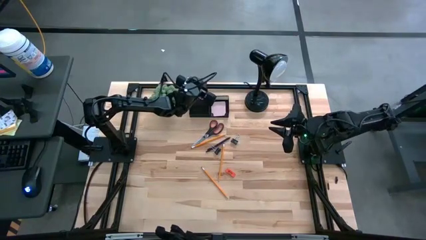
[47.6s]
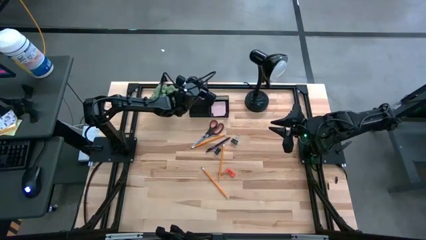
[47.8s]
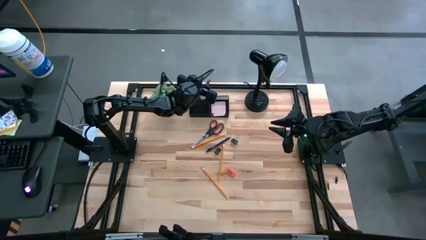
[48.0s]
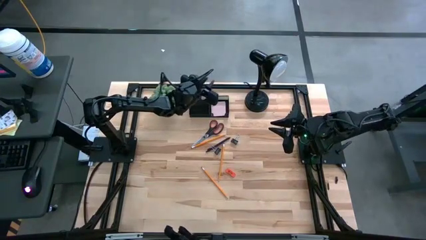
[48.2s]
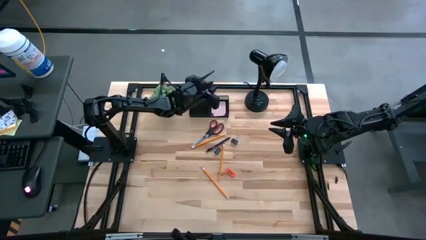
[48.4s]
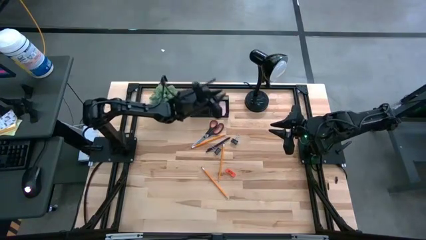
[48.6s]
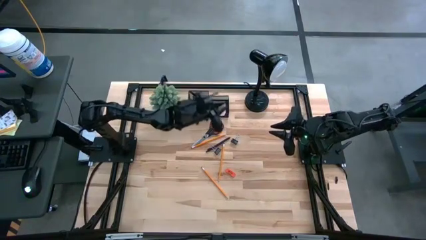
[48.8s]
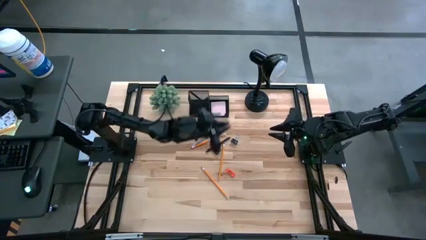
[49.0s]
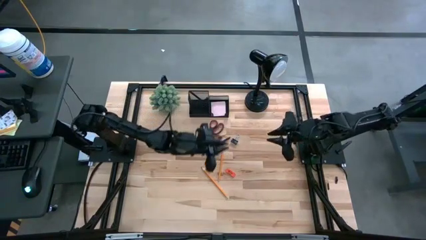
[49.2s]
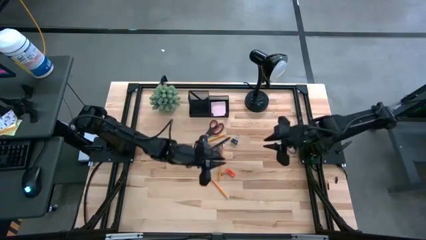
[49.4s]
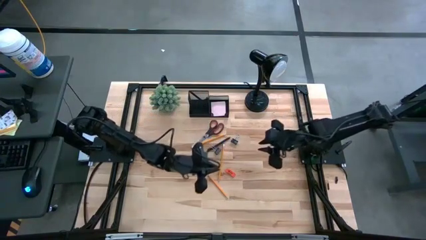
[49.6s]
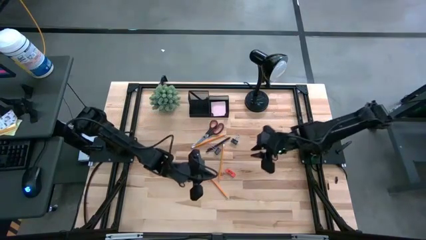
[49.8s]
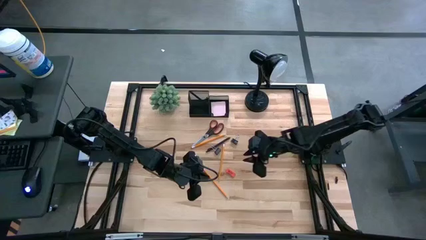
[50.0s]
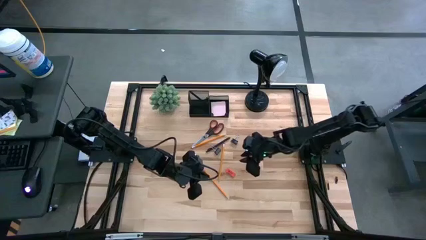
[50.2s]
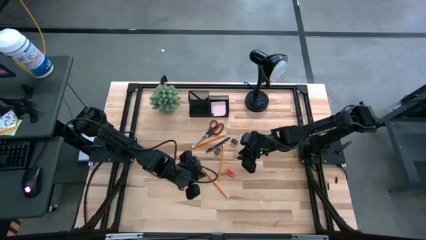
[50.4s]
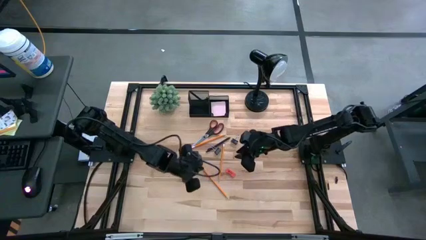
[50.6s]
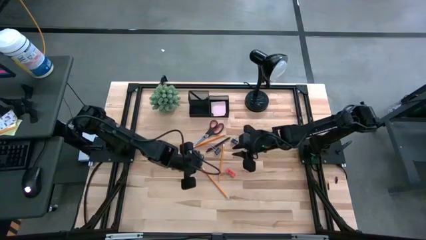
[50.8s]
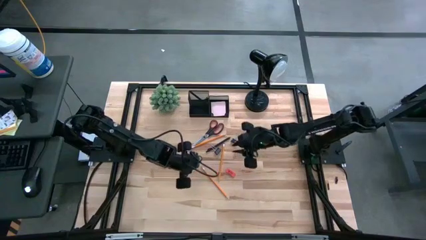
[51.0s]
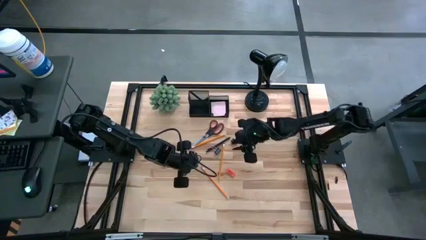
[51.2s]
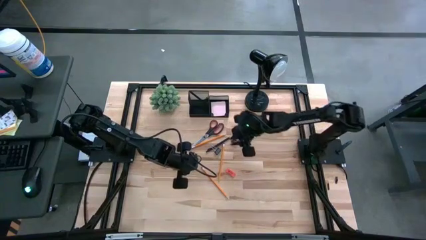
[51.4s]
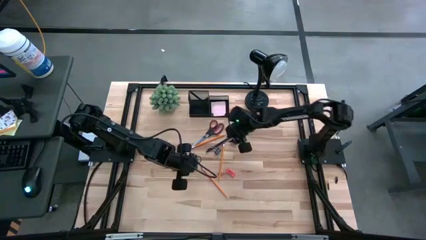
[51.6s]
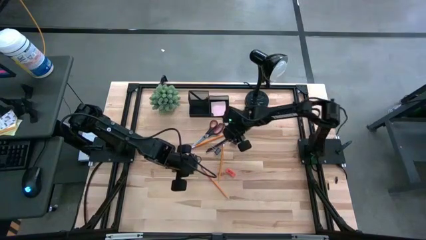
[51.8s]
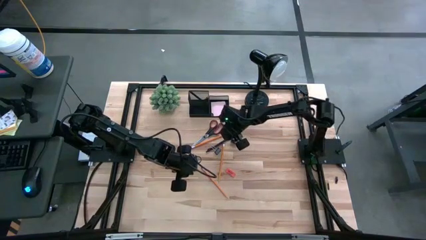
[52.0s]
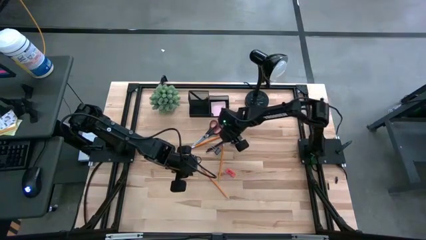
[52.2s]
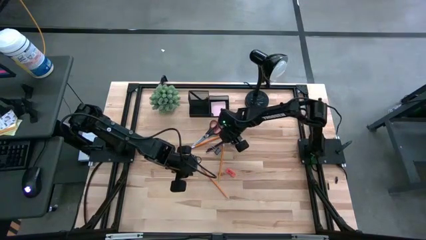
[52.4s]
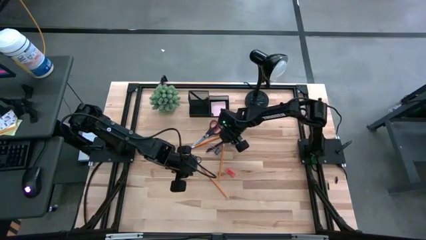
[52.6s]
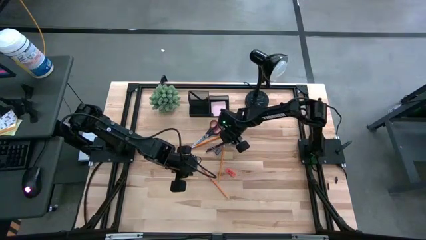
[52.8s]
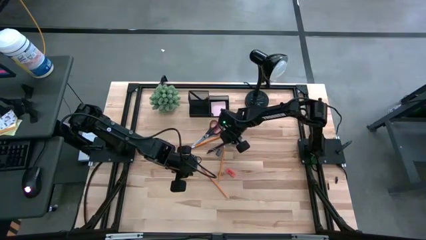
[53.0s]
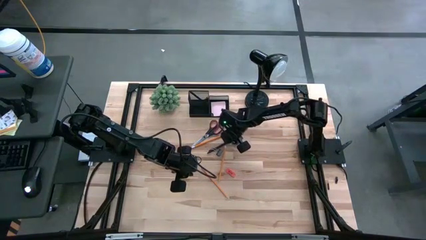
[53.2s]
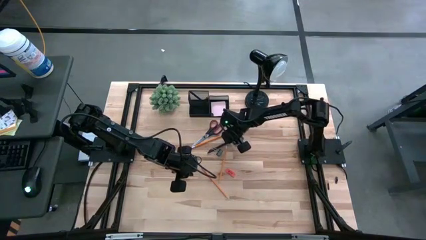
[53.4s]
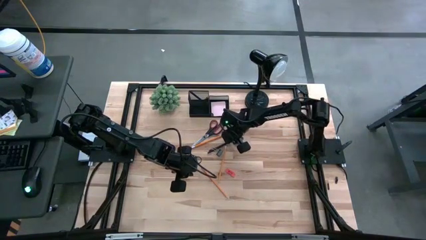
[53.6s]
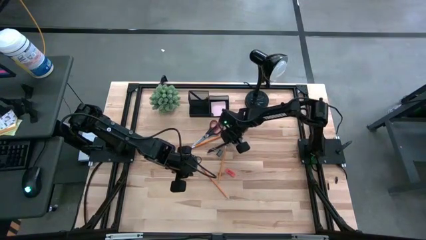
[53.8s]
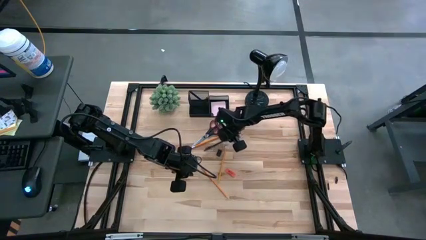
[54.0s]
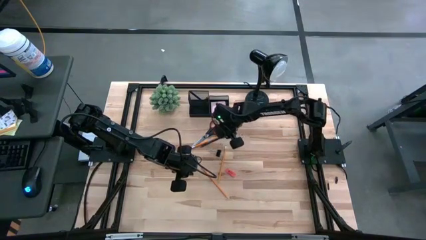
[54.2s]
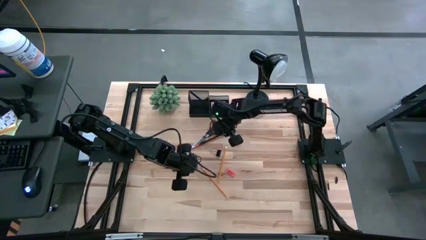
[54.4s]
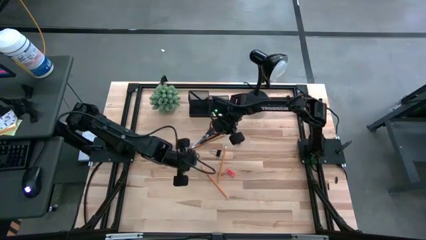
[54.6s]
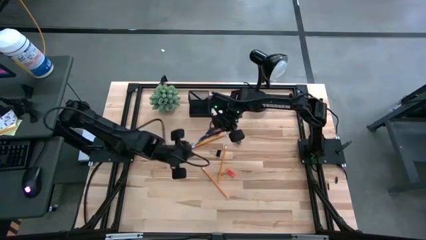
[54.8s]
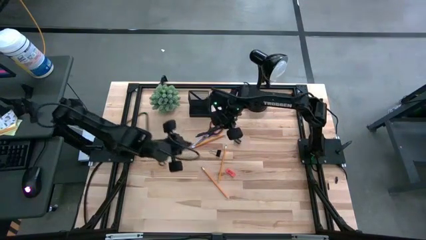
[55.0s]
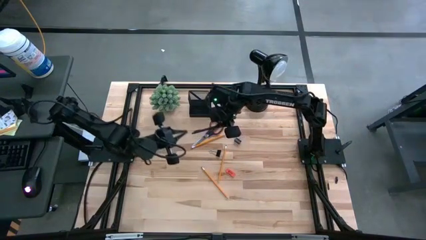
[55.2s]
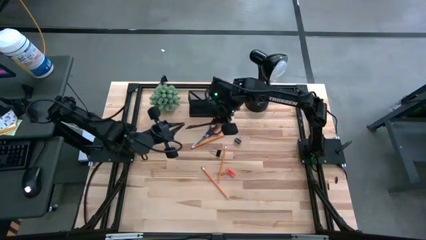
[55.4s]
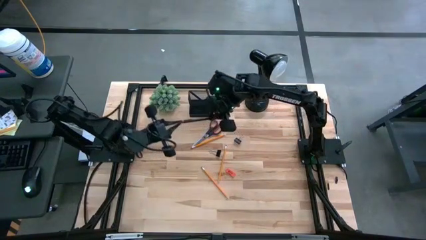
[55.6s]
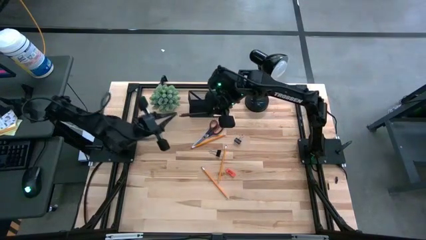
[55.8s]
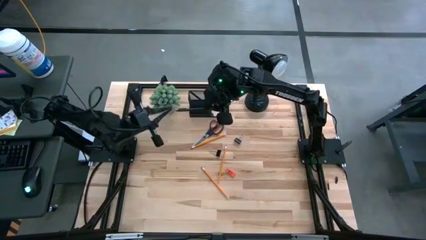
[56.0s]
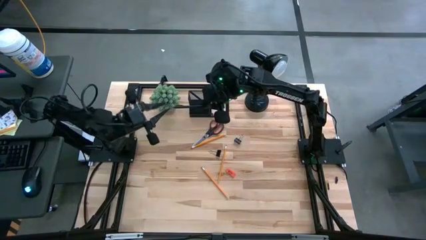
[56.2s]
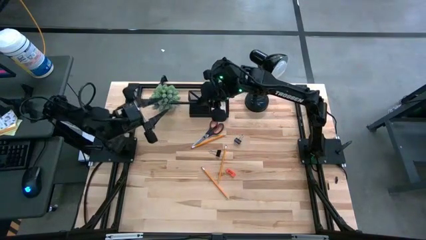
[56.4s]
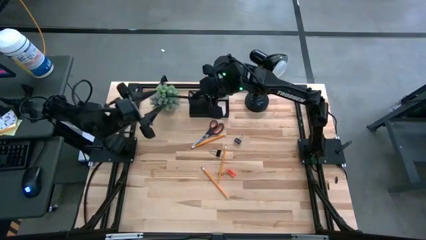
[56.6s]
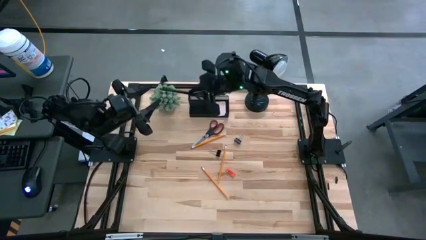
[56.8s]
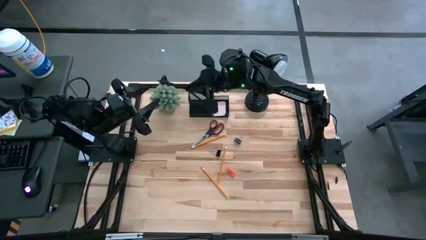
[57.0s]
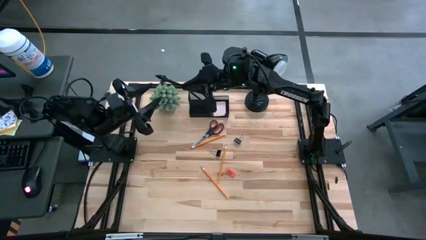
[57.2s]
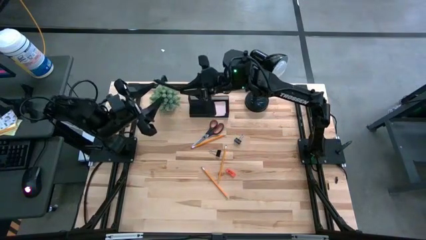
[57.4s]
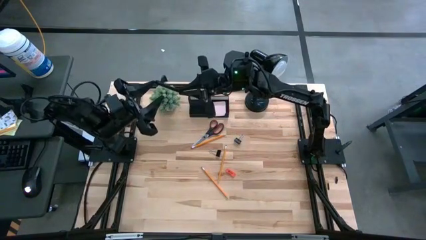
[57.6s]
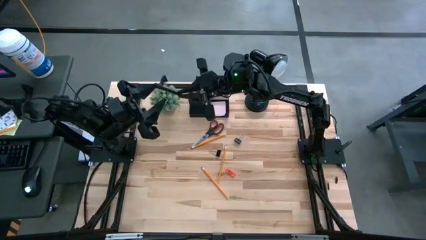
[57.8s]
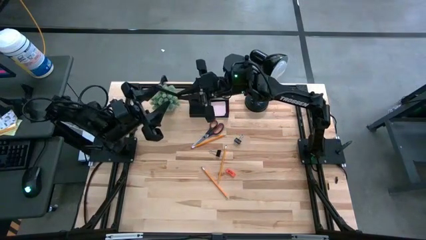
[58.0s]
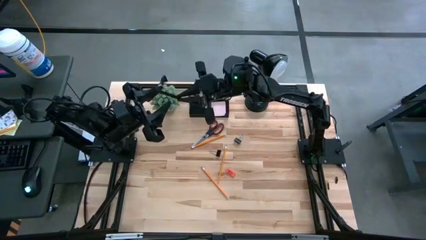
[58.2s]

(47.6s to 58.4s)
Task: Pick and place office supplies into organizer
Put the black pen into the black desk organizer
